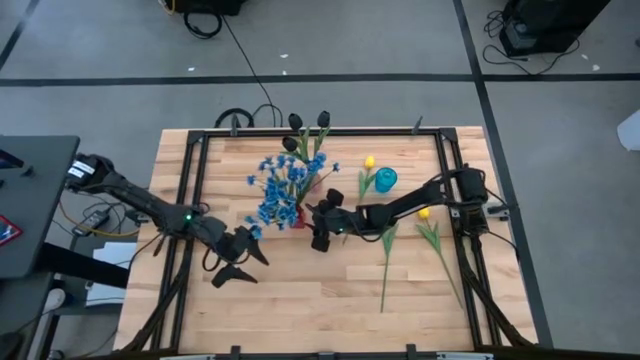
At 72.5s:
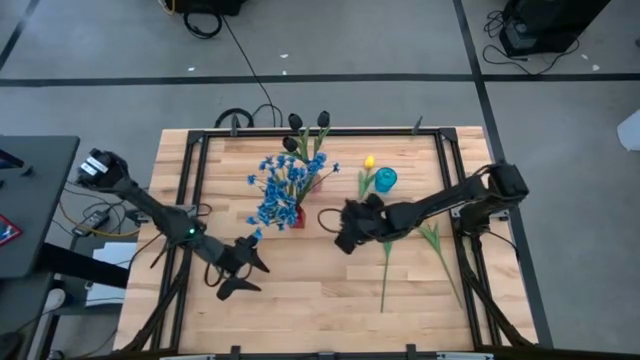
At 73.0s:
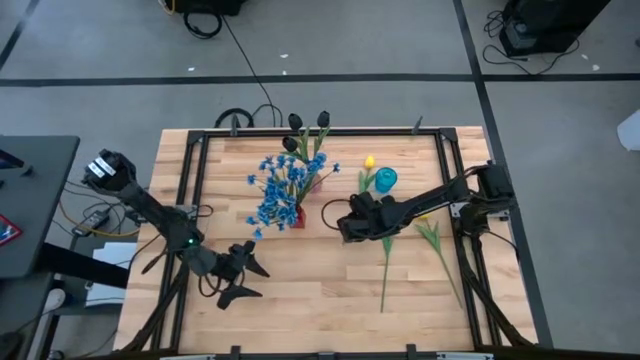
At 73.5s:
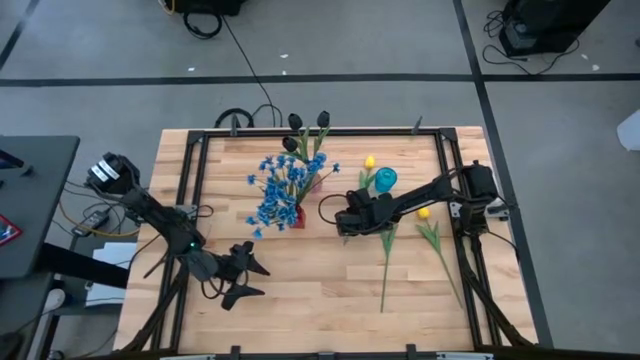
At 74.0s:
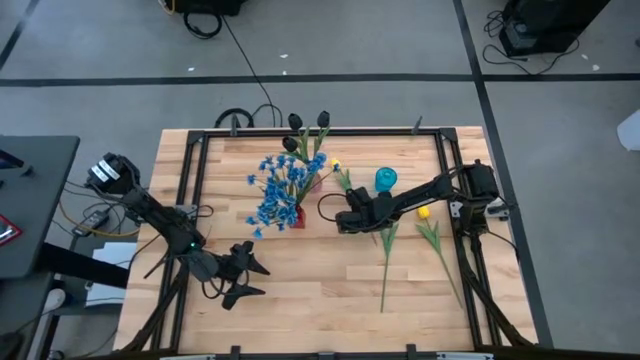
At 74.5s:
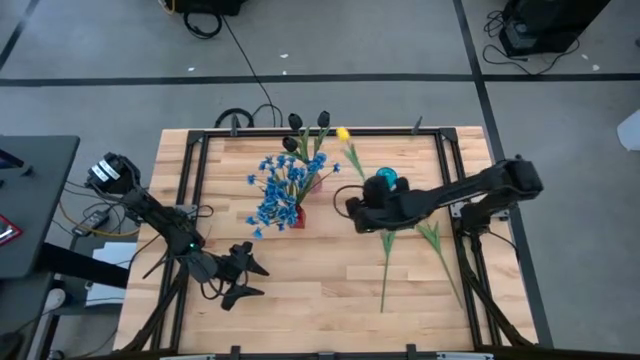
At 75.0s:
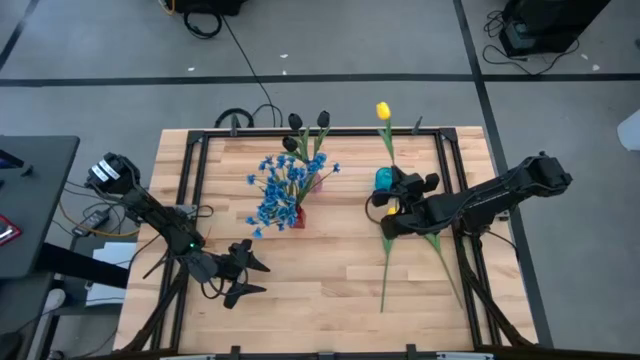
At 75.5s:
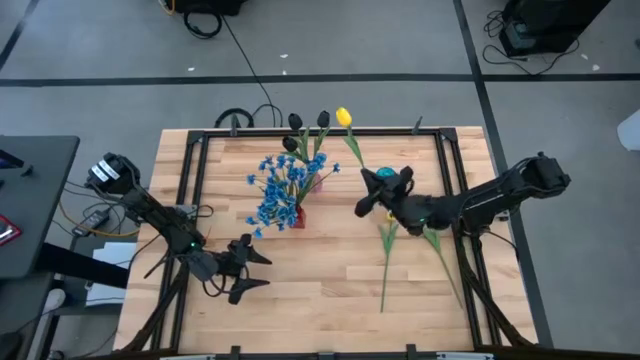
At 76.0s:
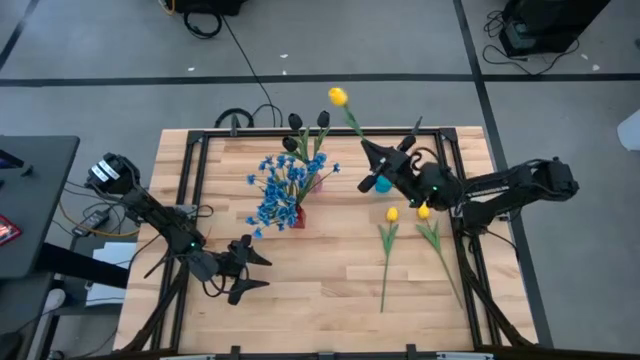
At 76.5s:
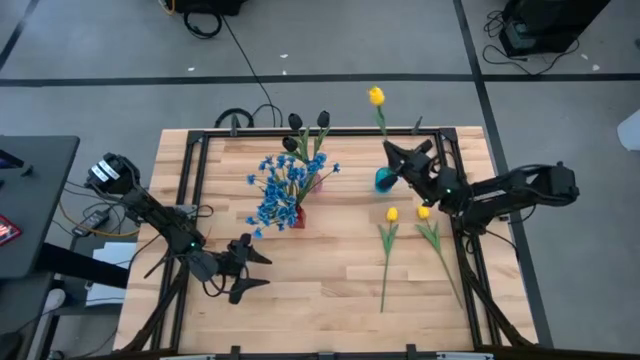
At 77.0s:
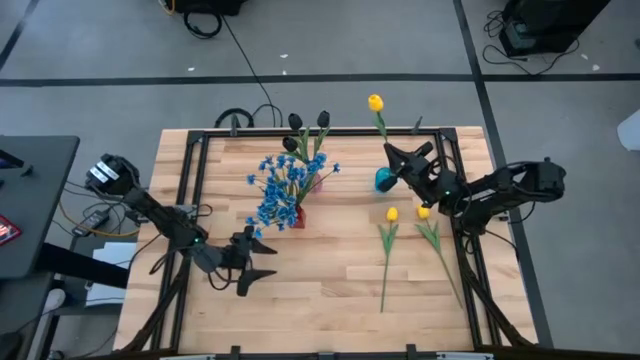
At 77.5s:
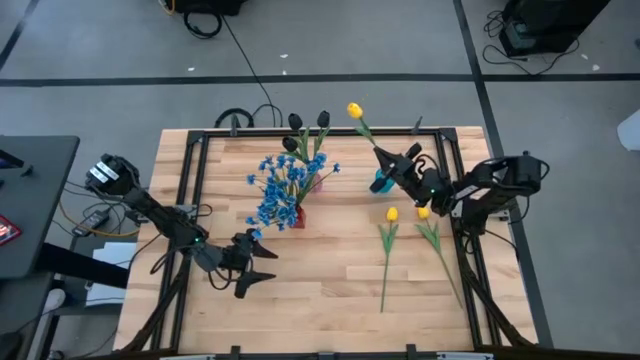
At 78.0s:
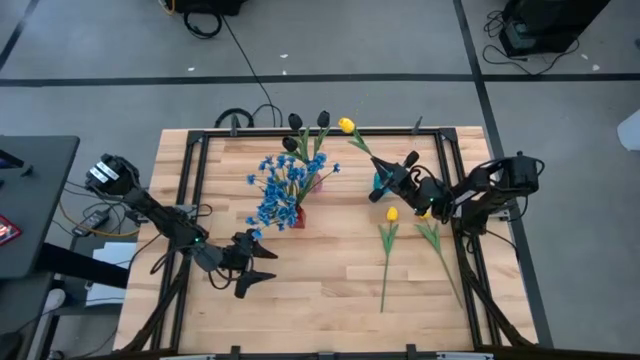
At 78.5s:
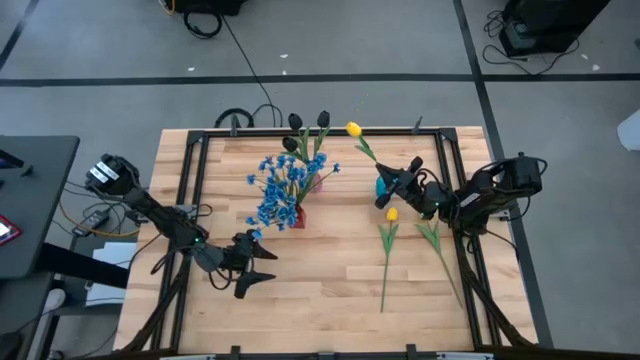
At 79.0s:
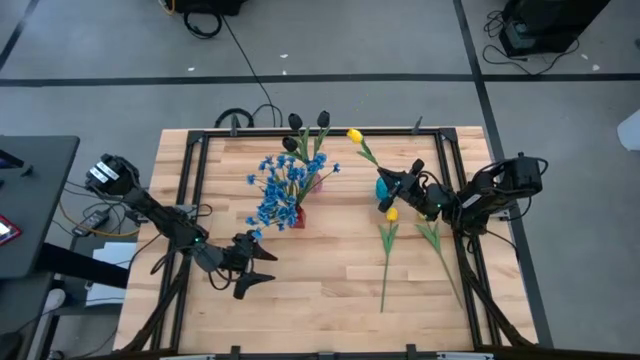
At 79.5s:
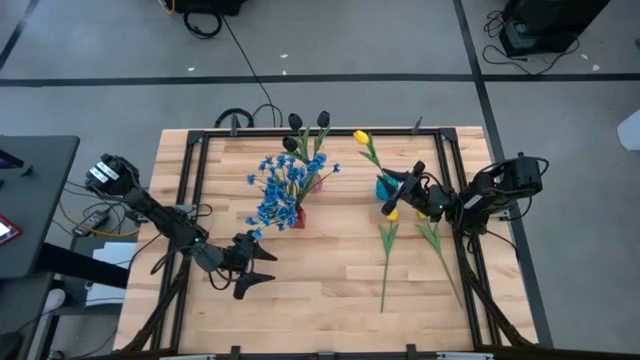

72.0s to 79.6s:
Task: Sort flowers into vase by color
Put the yellow tulip into the blue vase

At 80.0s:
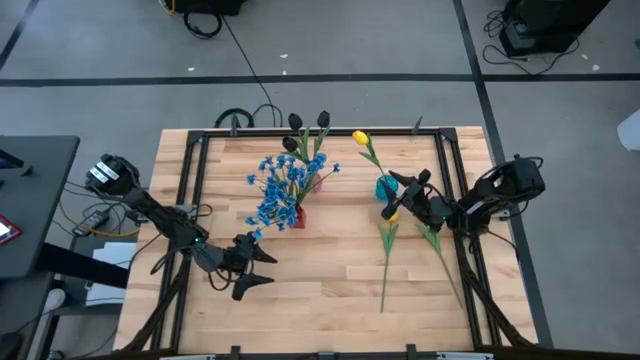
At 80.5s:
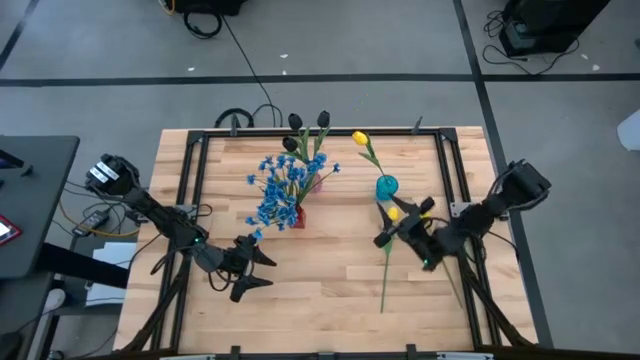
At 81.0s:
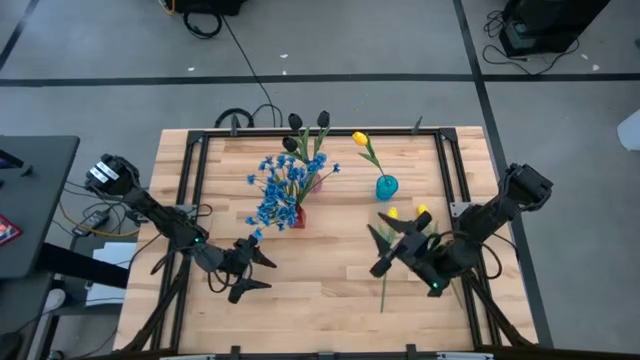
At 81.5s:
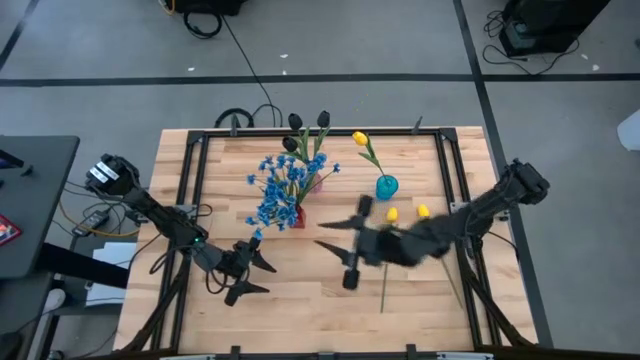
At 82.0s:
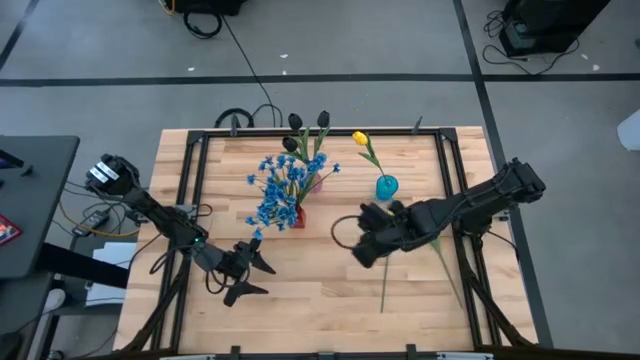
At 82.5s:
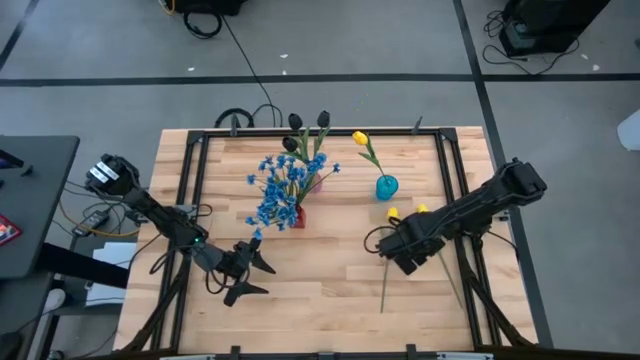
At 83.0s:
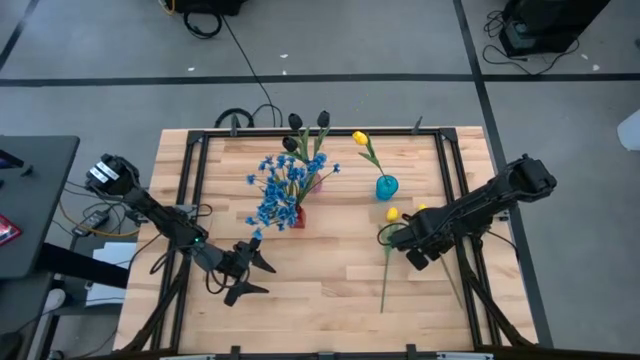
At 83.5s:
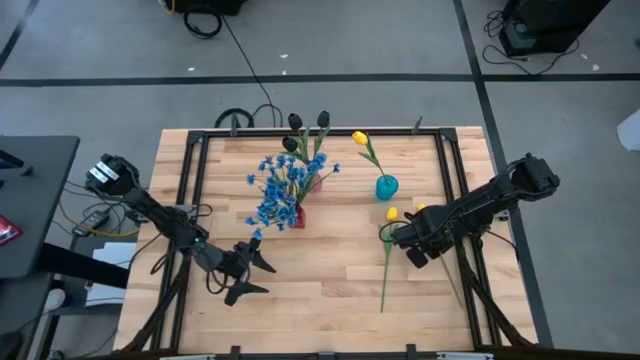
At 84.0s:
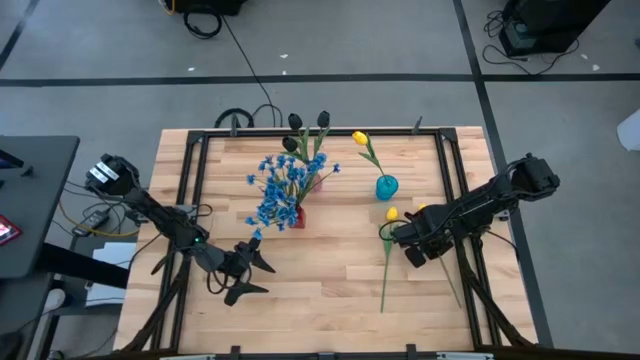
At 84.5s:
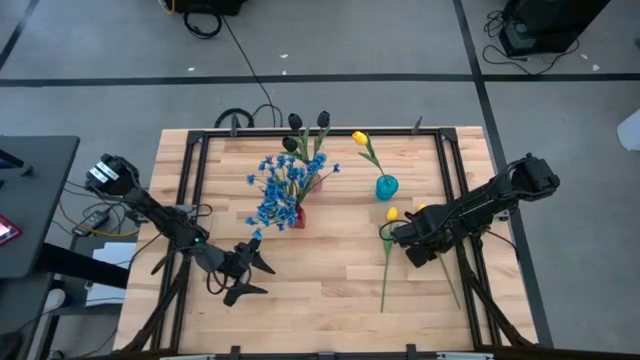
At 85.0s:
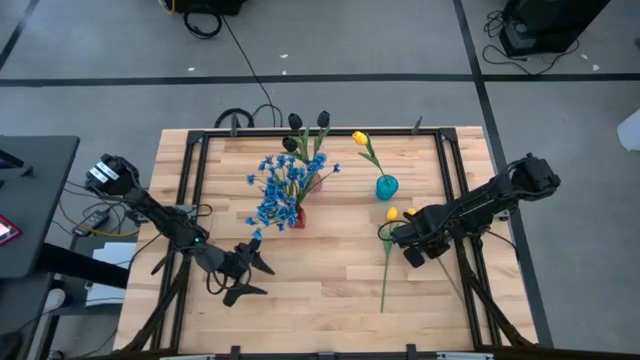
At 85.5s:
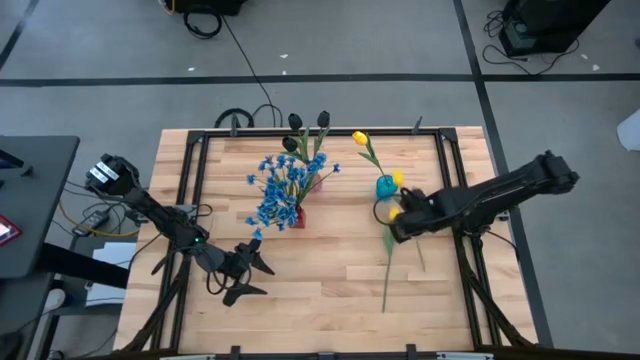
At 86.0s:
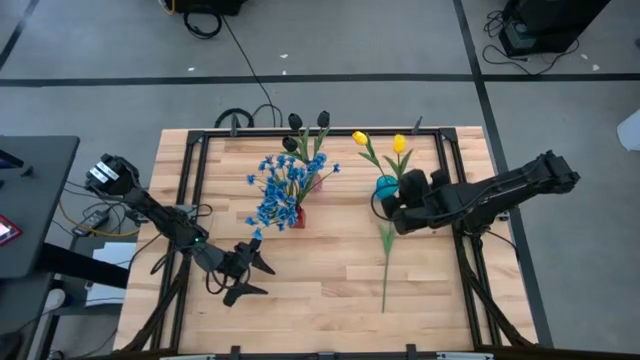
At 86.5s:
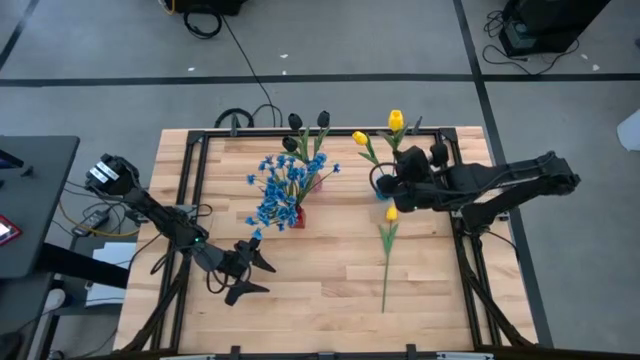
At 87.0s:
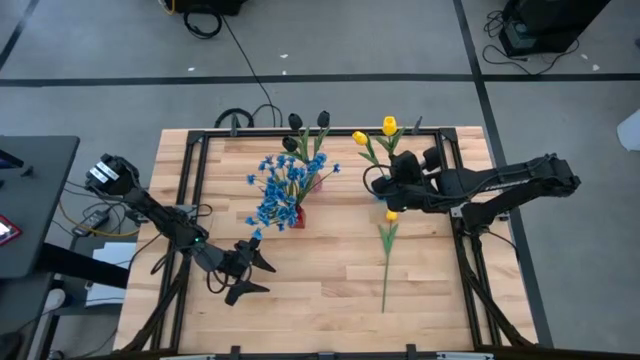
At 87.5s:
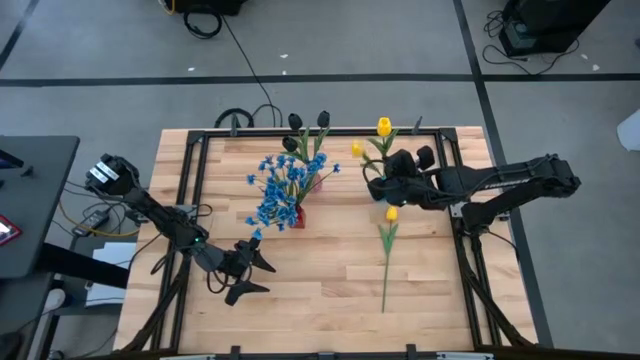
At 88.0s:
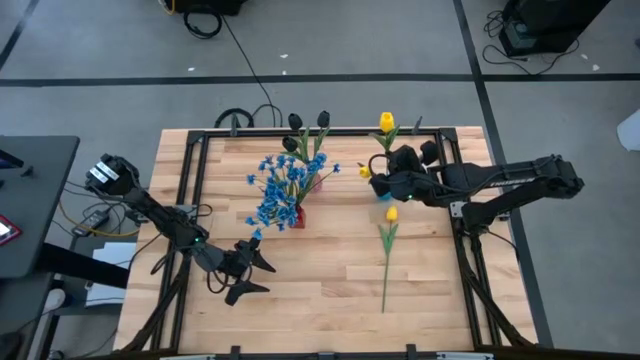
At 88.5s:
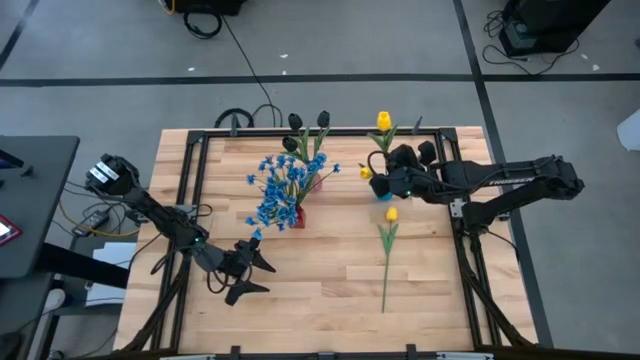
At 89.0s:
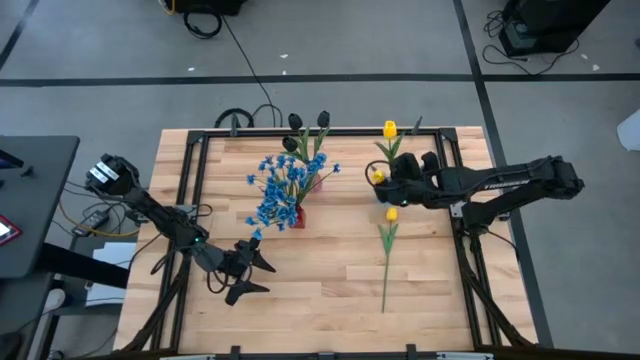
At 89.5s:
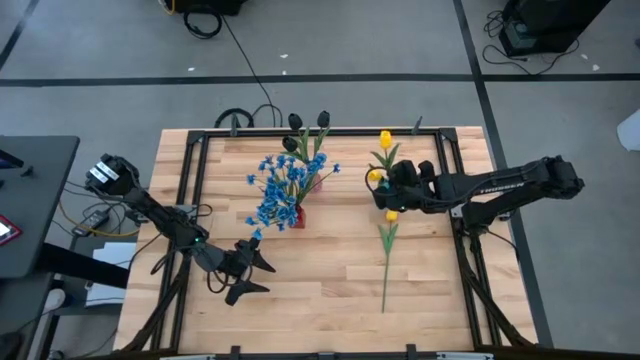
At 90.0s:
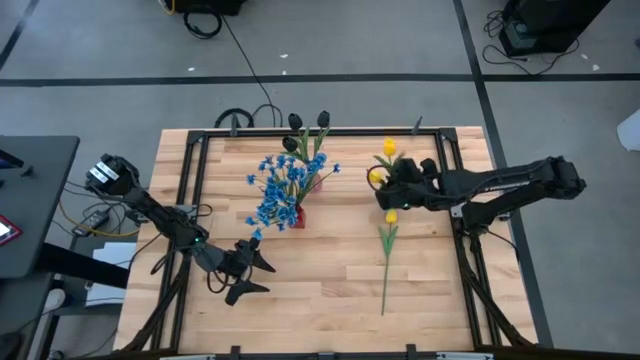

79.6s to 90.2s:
Put the yellow tulip into the blue vase

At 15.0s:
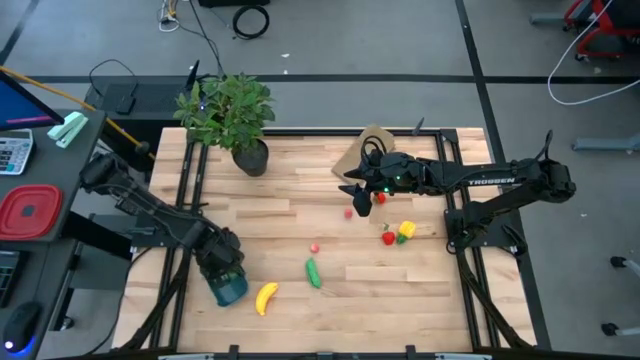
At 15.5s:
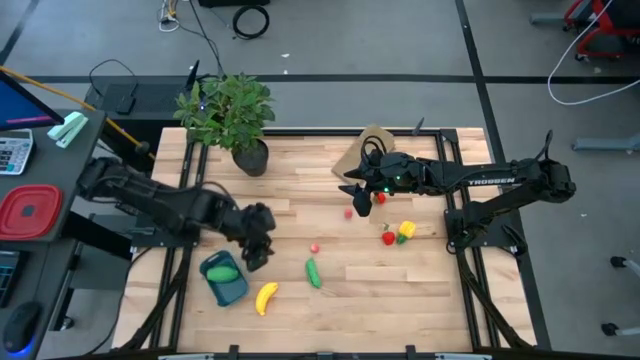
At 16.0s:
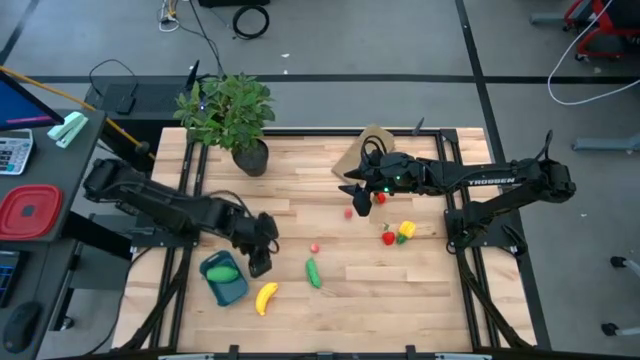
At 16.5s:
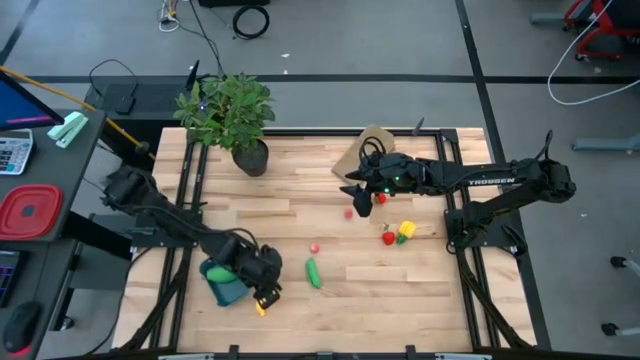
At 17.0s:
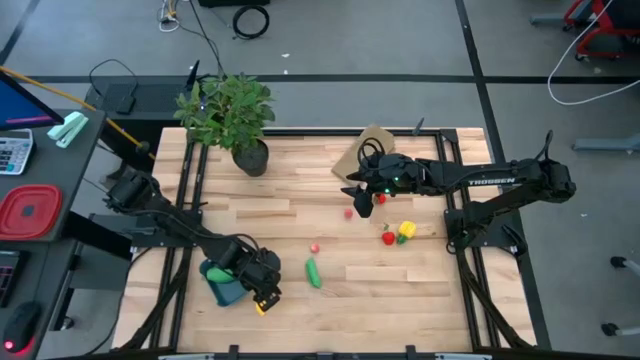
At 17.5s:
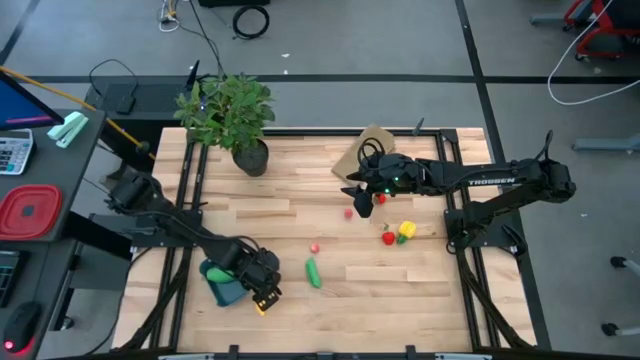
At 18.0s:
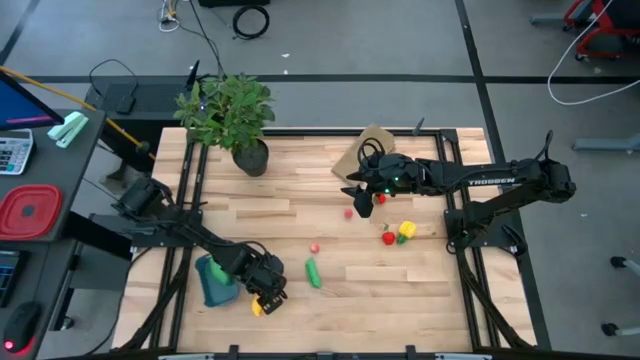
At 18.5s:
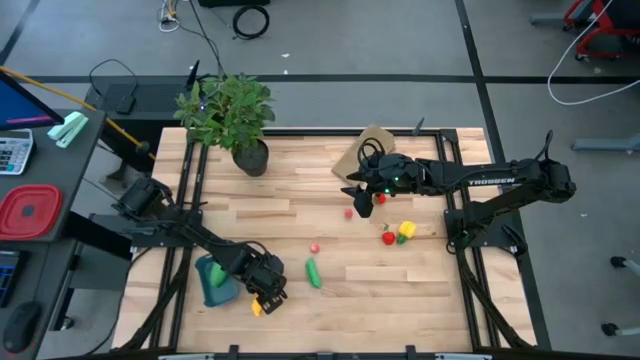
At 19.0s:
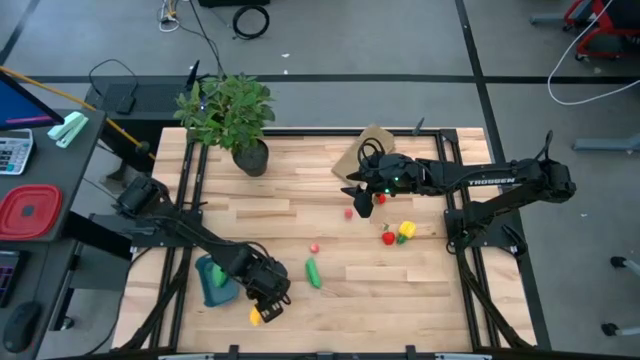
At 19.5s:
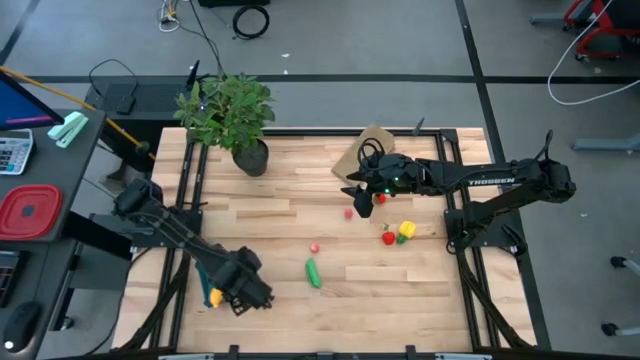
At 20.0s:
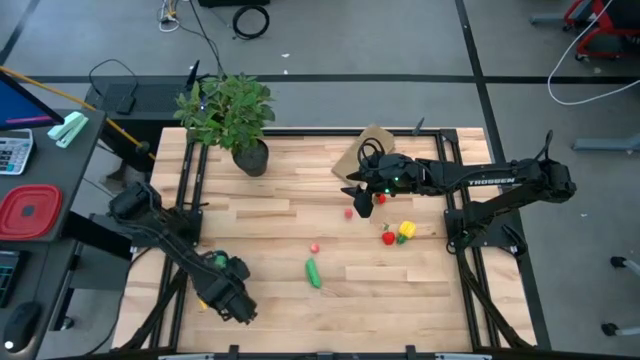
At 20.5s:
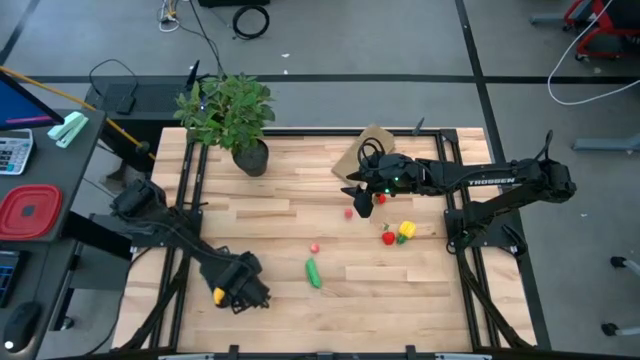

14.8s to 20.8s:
Task: Pick and placing Produce into tupperware
Put the yellow banana into the blue bin
